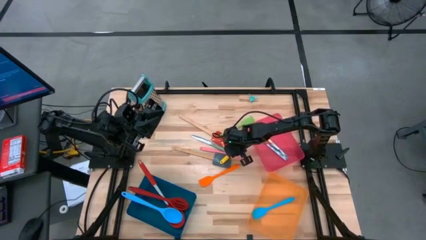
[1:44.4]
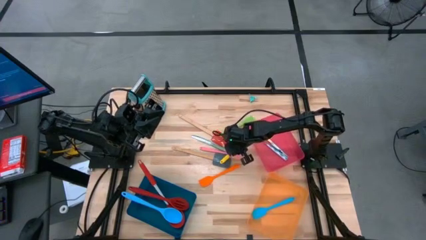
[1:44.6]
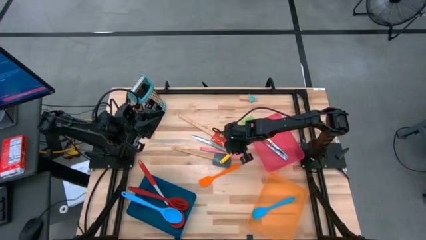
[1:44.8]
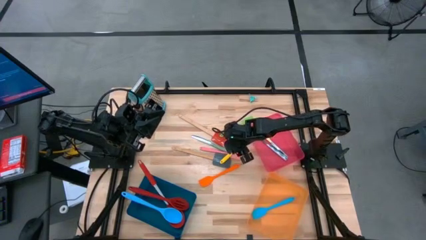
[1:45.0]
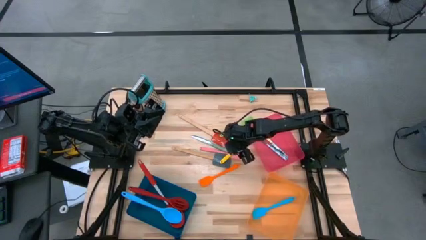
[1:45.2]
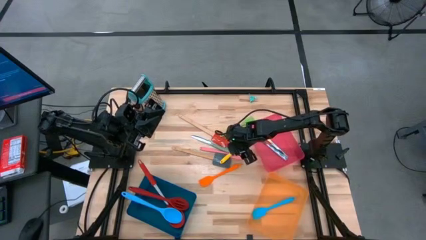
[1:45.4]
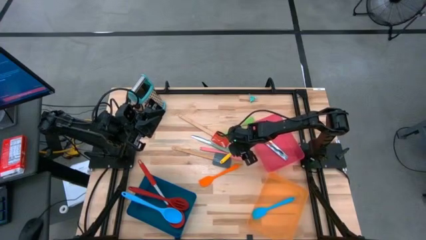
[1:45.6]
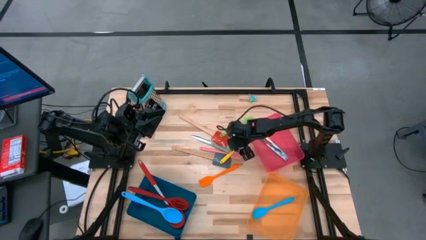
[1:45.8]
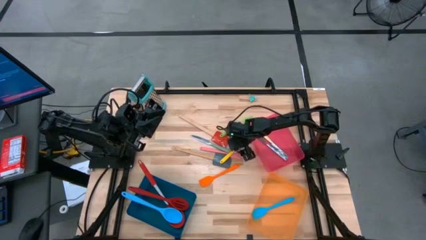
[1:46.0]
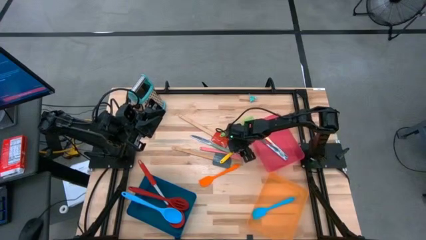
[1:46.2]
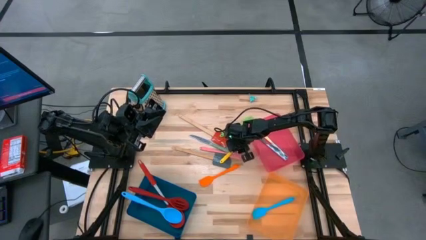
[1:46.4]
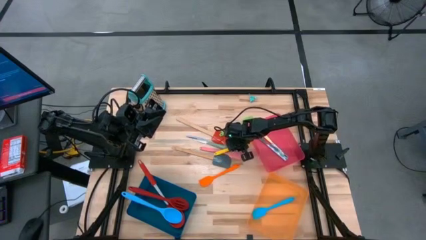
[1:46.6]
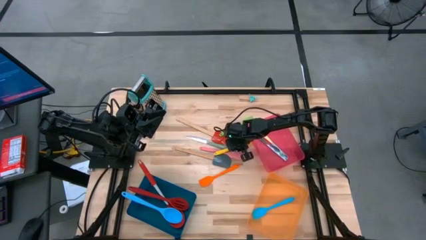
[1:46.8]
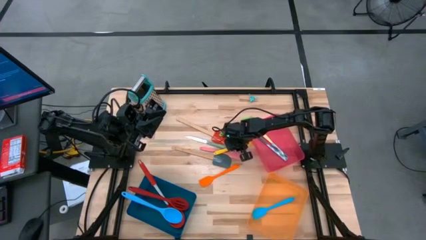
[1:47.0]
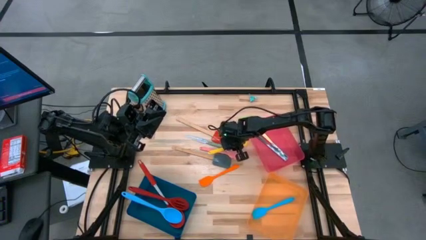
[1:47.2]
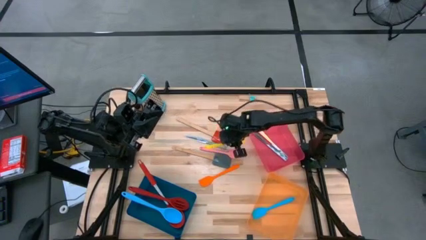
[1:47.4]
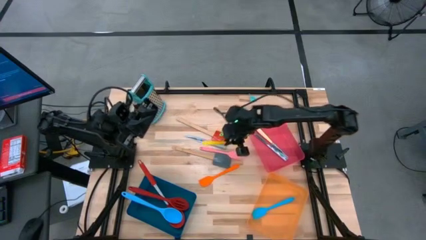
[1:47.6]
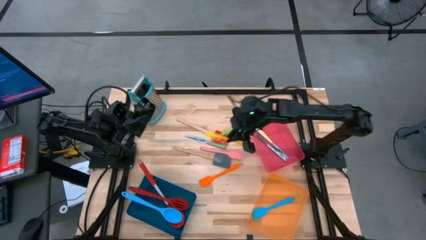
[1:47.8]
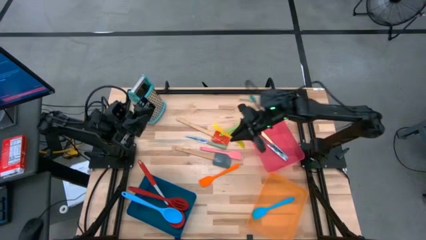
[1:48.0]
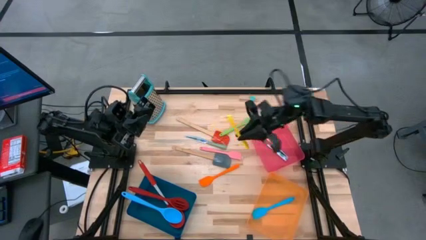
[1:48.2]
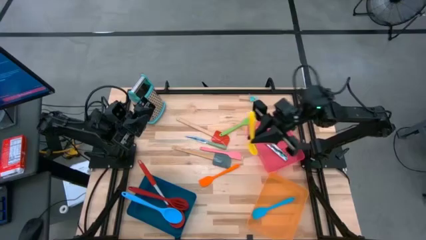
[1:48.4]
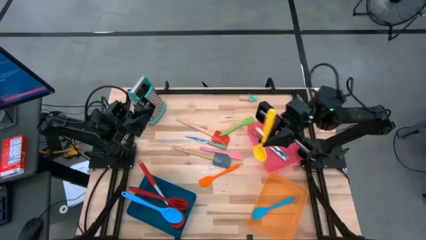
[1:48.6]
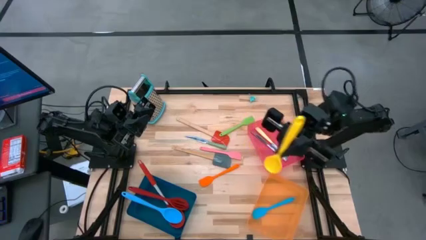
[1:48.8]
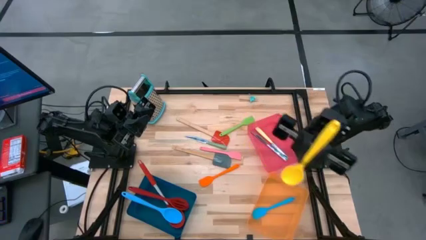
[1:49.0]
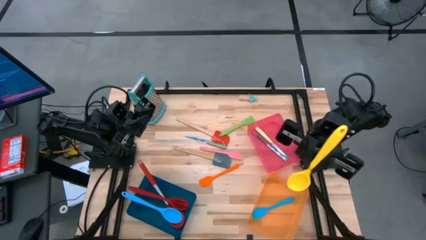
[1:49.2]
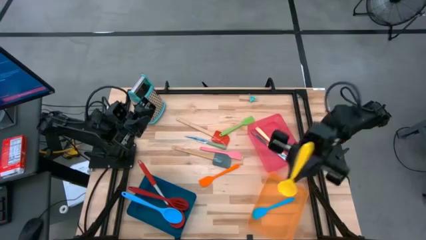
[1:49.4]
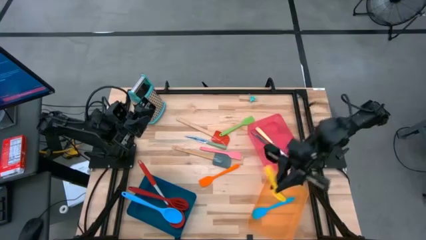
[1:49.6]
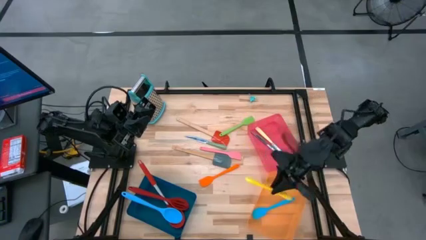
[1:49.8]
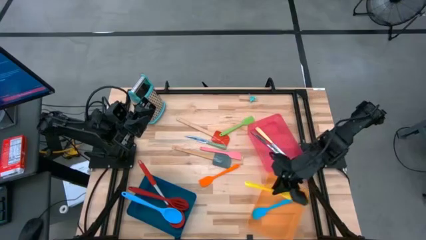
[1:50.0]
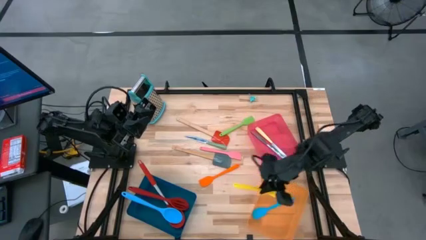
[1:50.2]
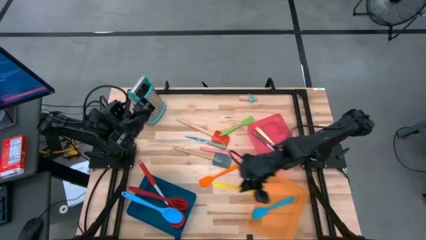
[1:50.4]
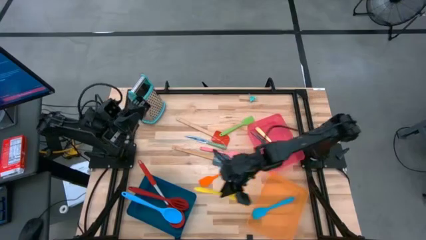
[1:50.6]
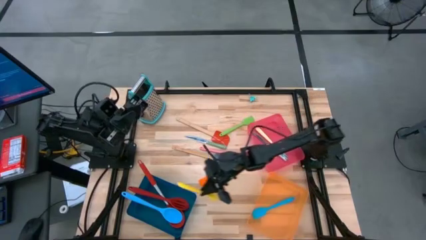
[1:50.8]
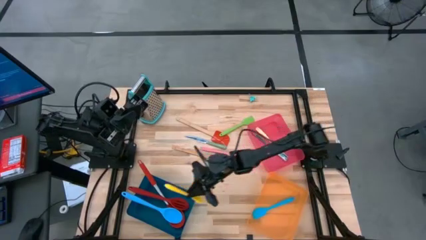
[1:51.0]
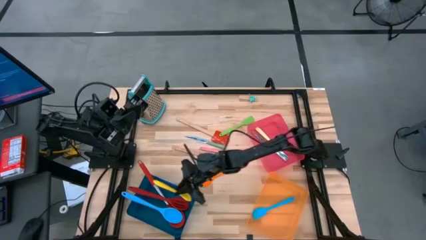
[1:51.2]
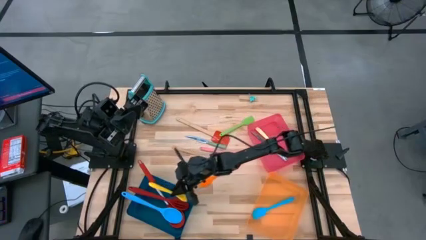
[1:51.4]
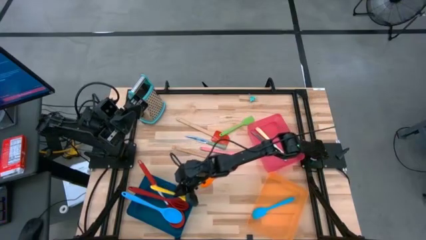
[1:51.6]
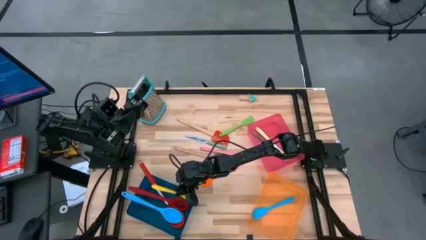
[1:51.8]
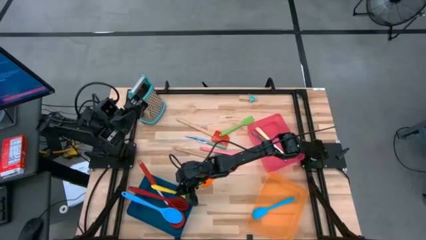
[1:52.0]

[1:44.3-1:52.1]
Task: Pick & Place Kitchen Items
Put the yellow serving spoon into the blue bin

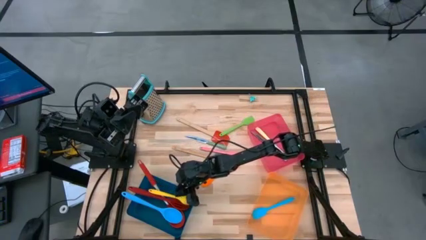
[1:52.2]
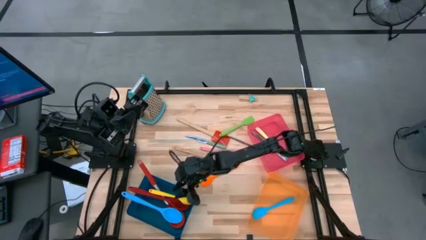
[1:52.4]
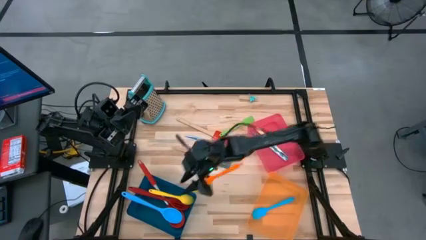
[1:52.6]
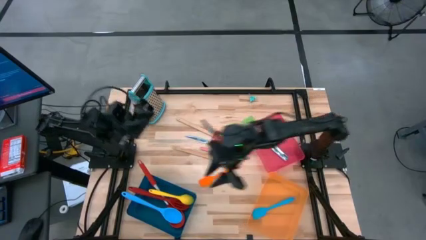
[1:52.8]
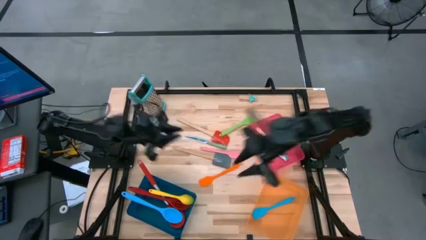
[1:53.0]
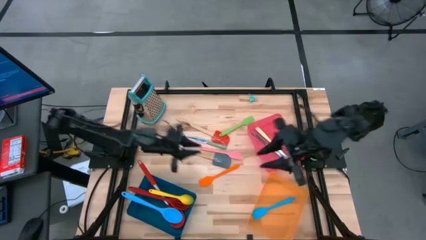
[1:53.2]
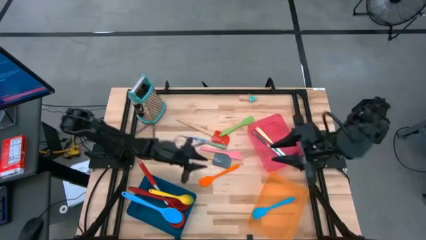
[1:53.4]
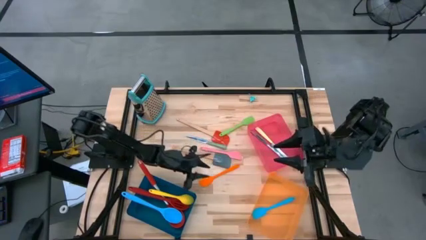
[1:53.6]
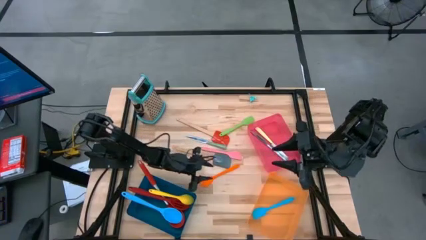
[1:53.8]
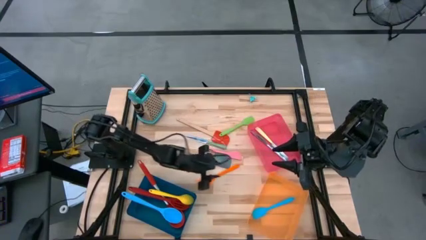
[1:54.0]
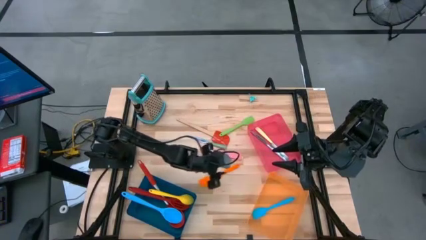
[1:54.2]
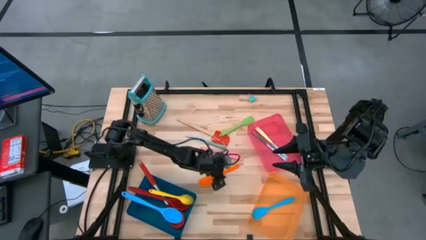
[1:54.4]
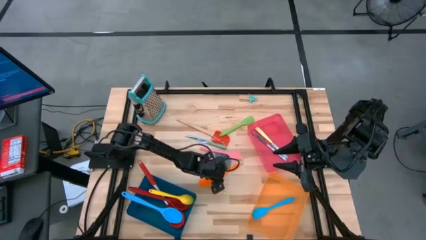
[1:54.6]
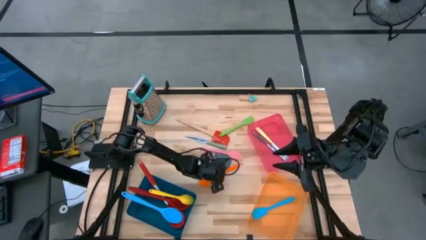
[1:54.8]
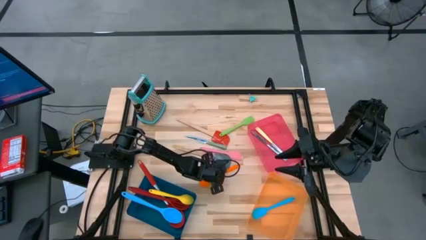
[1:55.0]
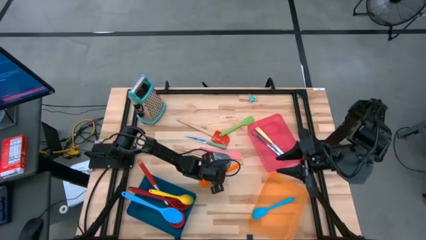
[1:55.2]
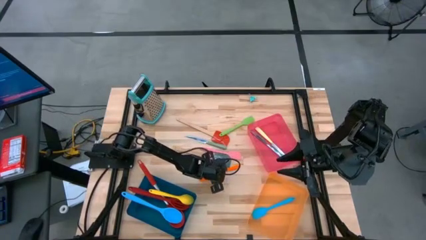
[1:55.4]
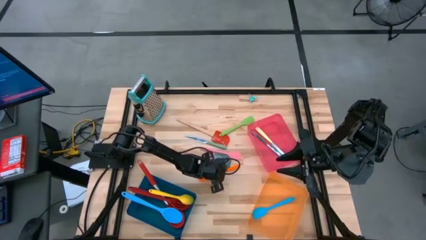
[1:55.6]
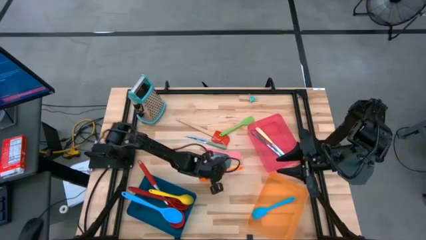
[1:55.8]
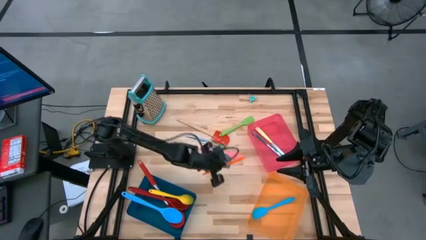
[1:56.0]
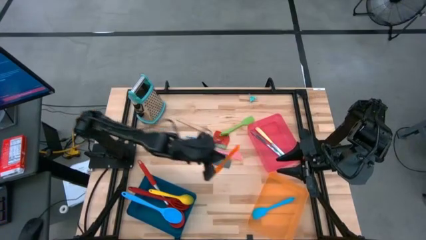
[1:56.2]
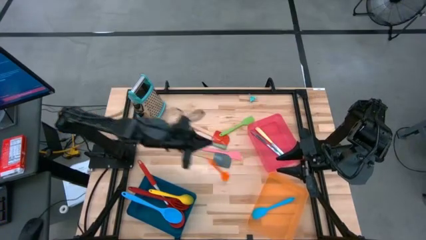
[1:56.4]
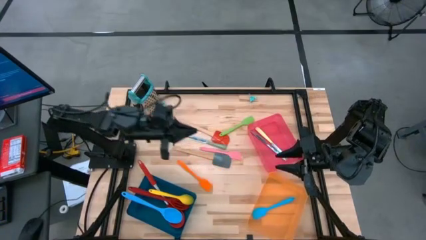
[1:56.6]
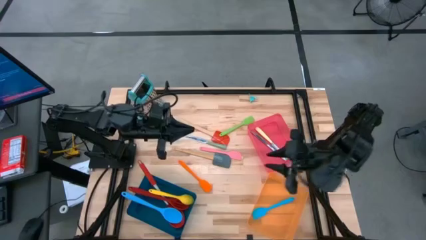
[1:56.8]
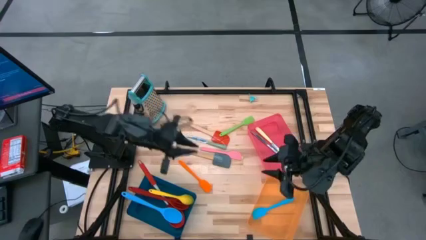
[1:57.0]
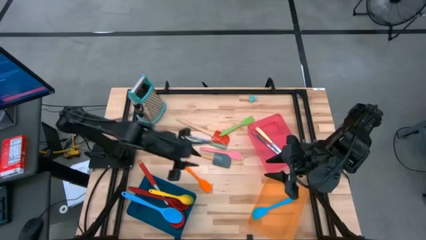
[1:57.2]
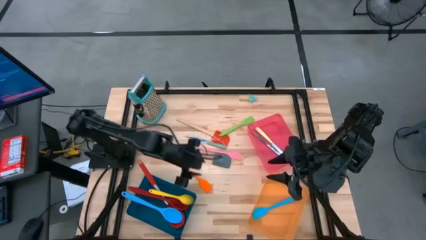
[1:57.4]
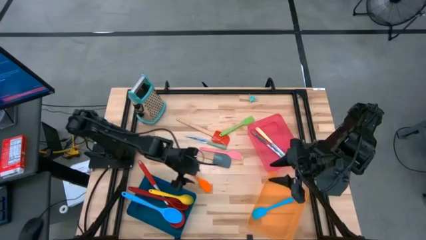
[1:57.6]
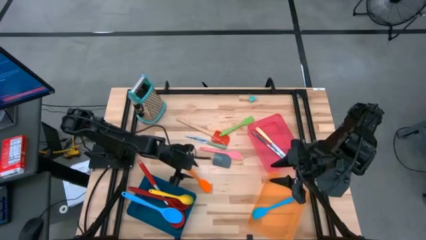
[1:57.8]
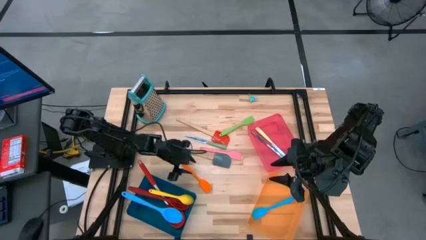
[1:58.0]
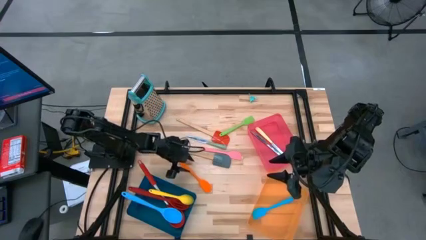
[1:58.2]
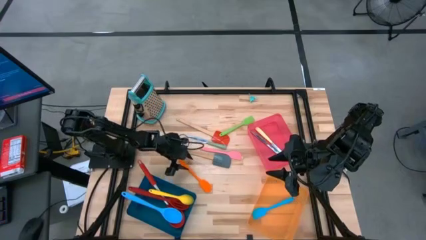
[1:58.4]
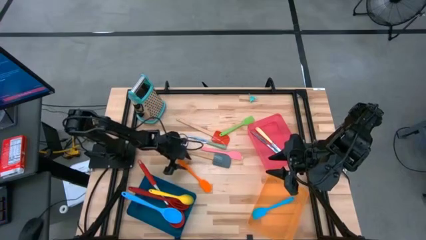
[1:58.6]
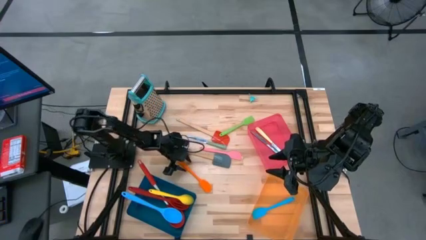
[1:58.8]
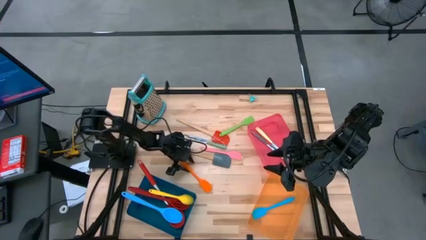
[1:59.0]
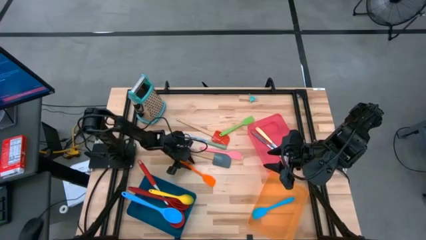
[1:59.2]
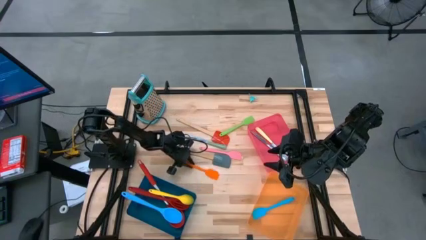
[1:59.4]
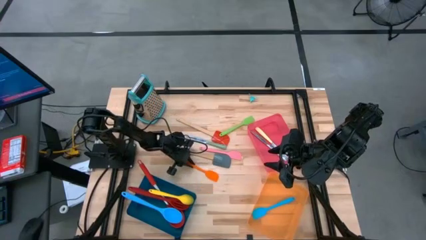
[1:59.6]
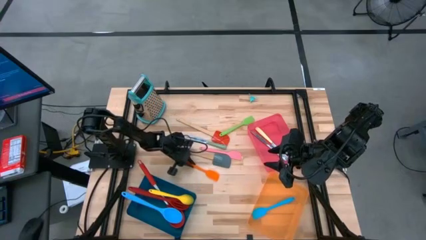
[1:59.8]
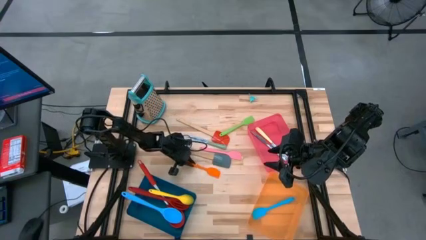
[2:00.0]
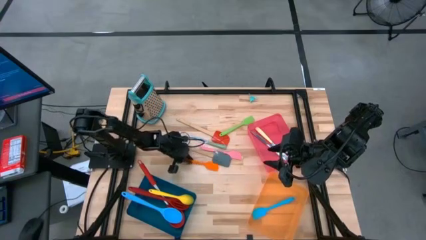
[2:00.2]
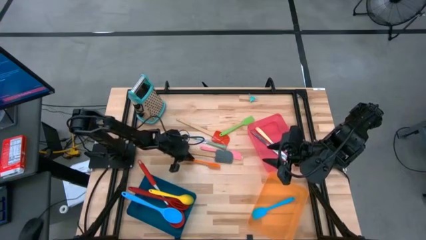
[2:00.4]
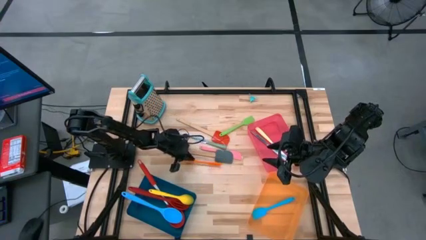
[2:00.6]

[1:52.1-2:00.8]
Put the orange spatula into the orange bin
